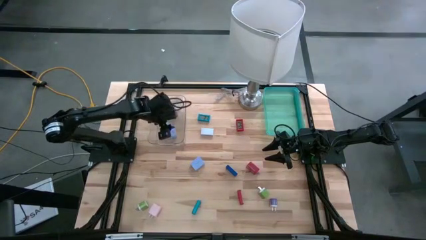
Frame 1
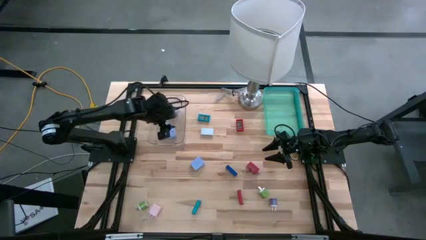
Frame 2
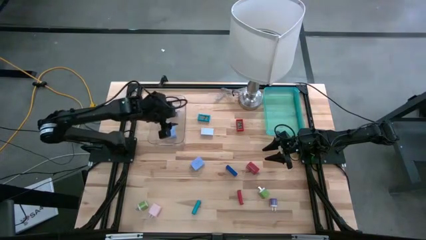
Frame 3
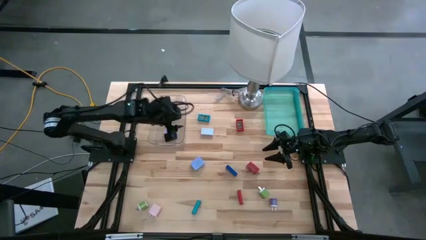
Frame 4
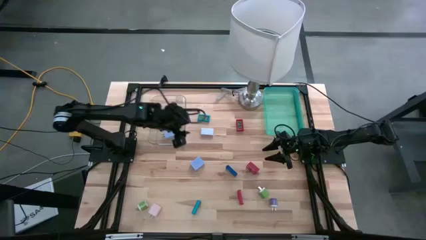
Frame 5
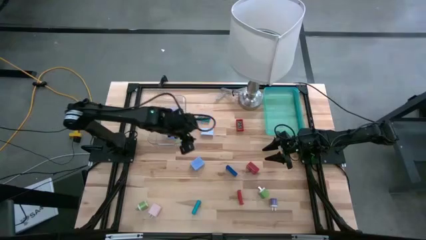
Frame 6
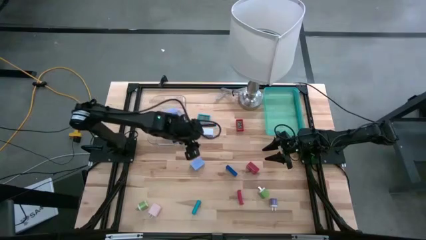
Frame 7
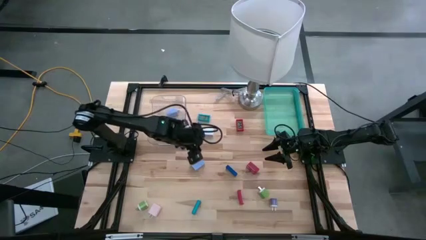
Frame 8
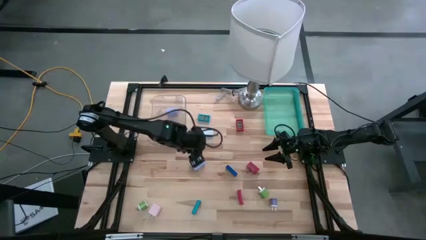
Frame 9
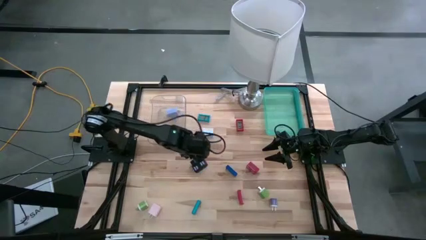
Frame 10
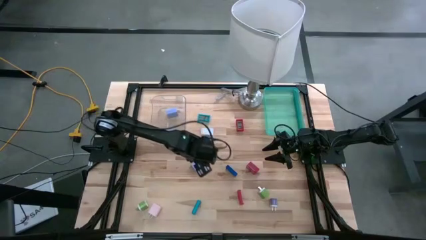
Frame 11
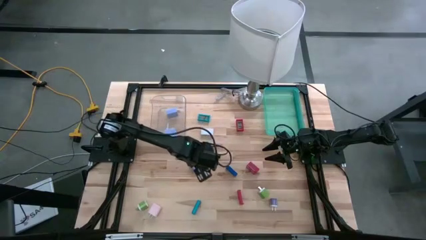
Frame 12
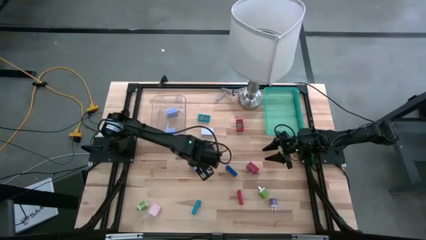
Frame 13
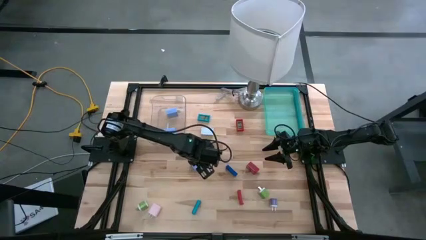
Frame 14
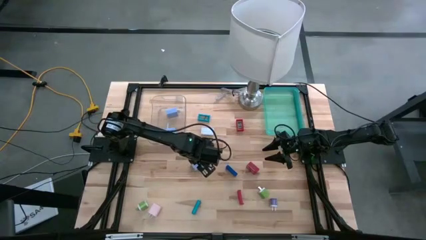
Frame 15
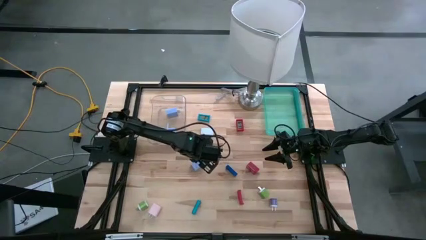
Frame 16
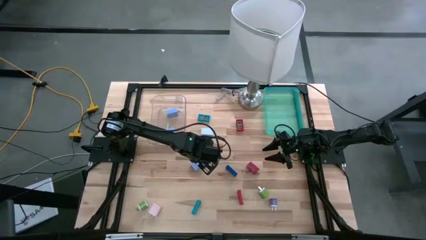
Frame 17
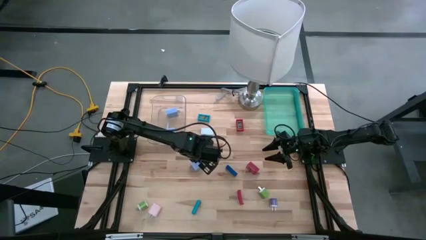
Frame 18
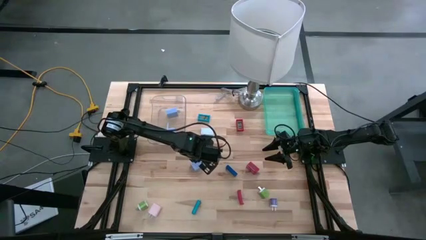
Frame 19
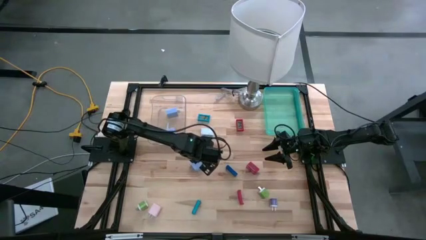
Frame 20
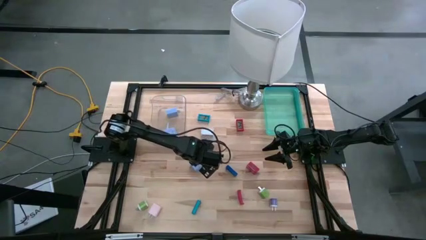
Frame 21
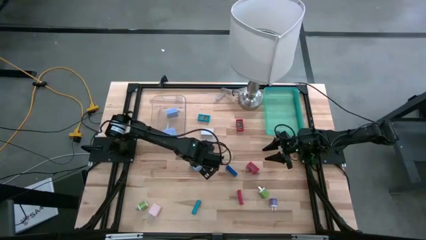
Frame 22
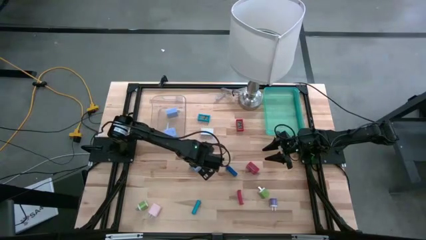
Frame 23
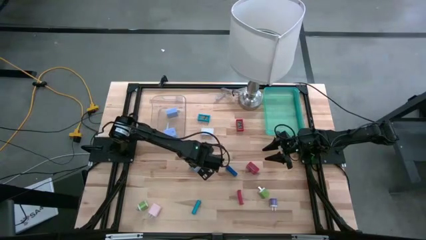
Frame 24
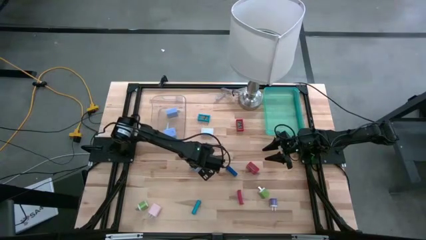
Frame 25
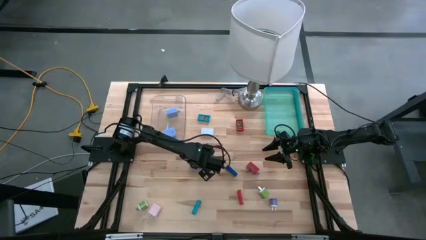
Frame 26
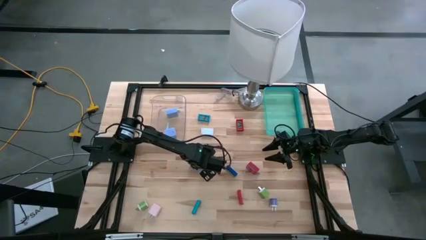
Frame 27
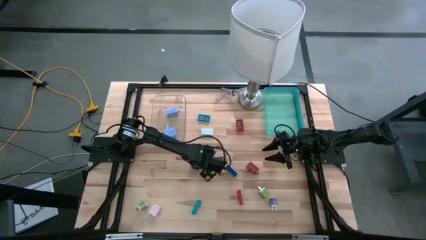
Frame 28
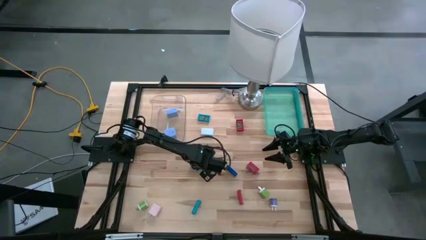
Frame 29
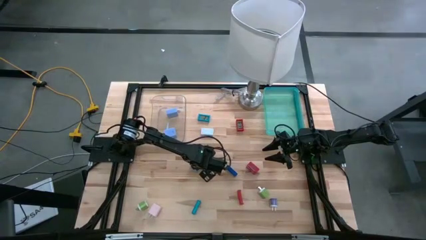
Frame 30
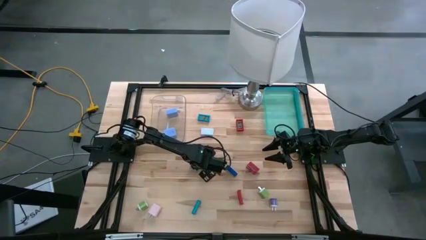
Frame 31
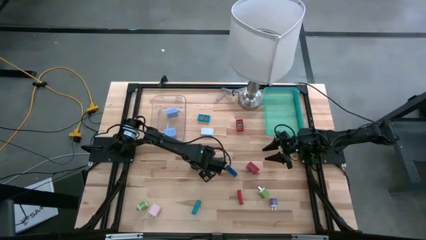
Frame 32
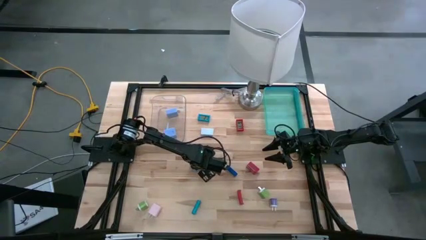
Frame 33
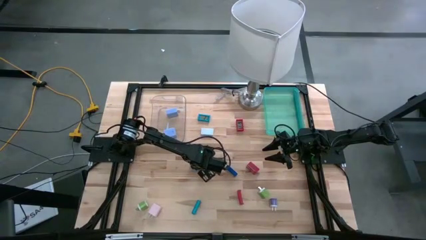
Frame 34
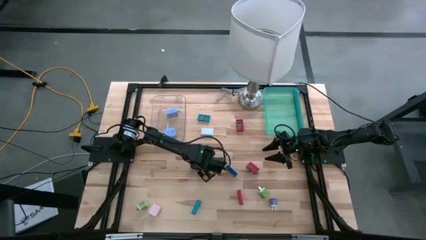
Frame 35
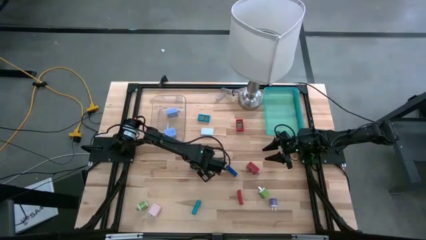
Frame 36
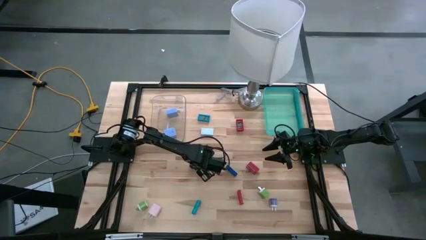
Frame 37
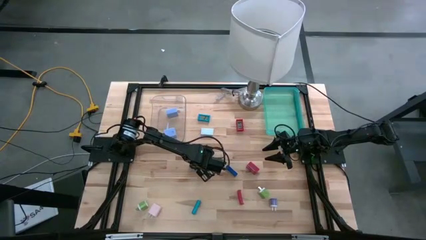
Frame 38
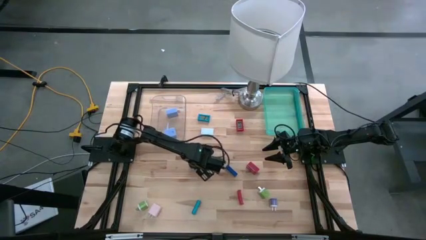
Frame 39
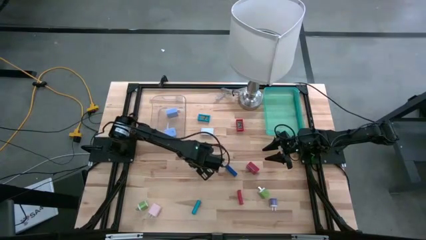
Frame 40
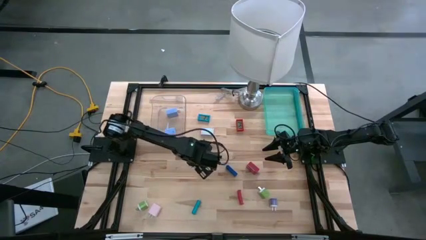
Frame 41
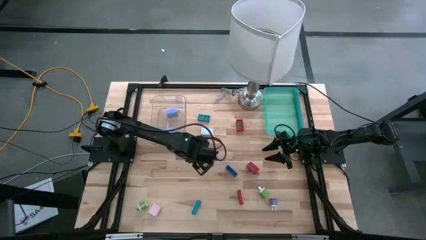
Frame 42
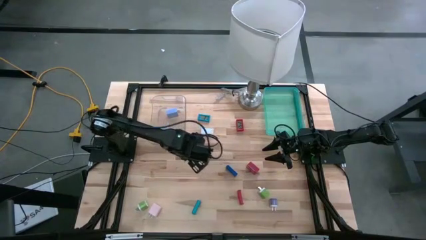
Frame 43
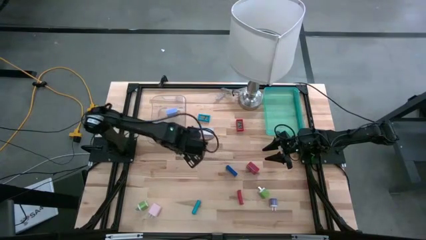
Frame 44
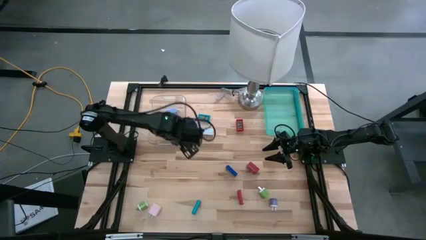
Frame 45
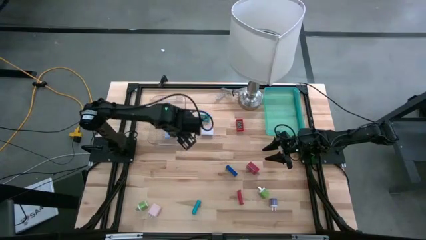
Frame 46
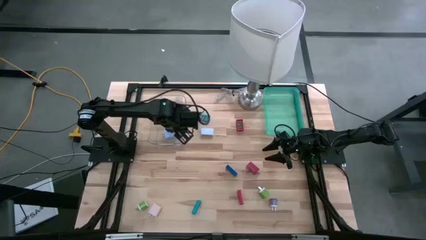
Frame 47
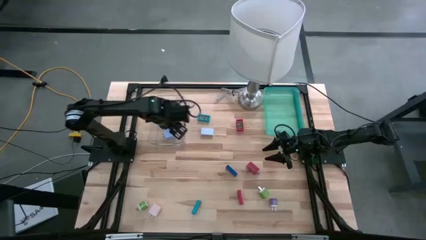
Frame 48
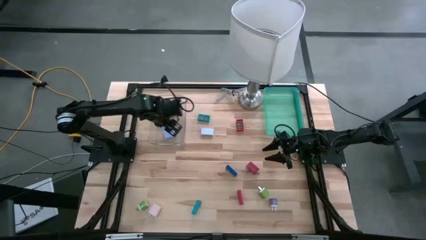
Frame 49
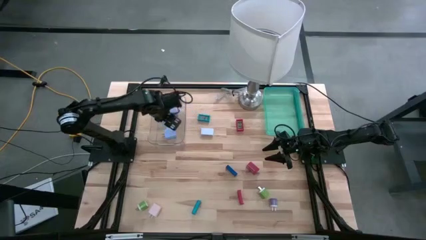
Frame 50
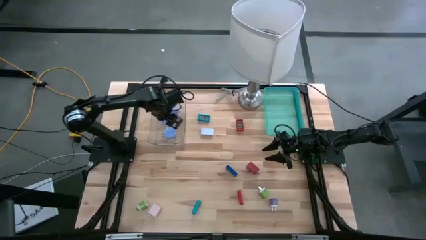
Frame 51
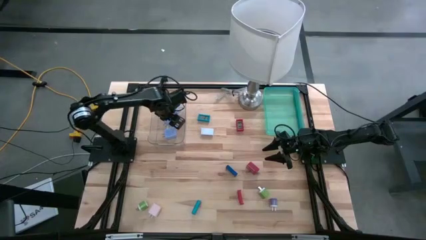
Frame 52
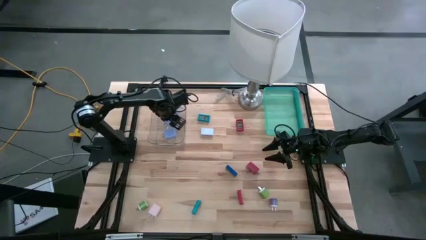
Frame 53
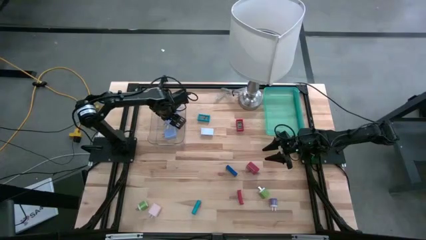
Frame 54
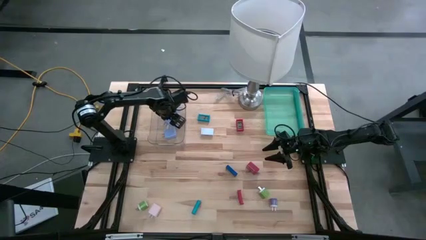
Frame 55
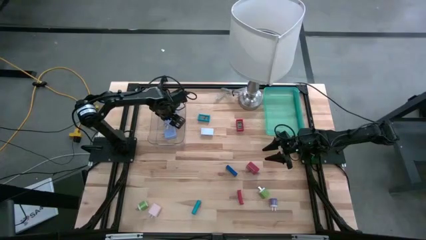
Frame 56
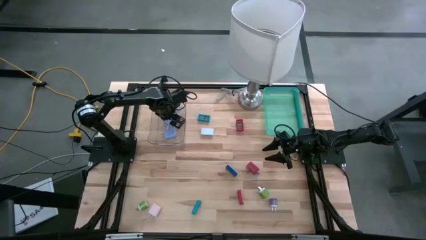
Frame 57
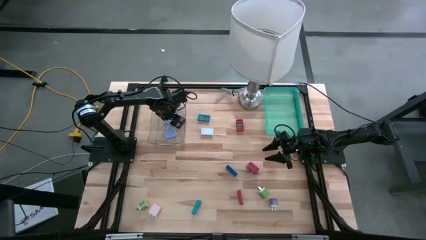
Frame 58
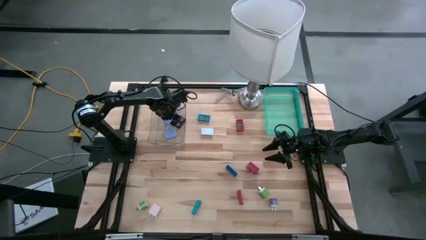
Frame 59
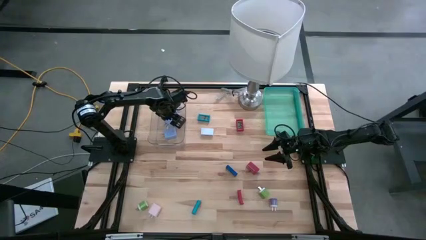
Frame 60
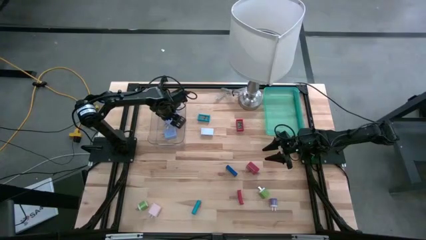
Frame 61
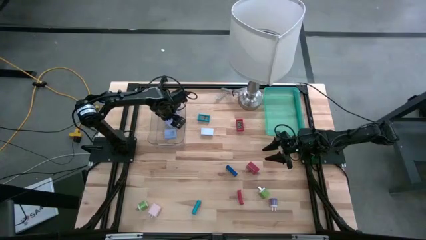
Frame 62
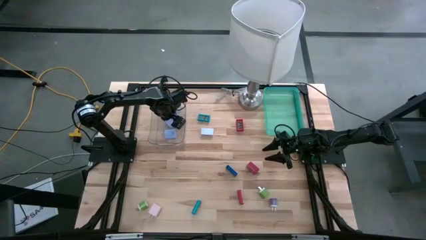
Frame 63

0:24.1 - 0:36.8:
Task: Pick & Place Office items
Put the middle blue charger adapter into the transparent bin

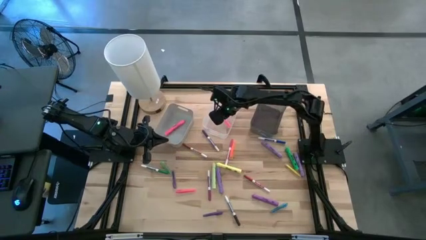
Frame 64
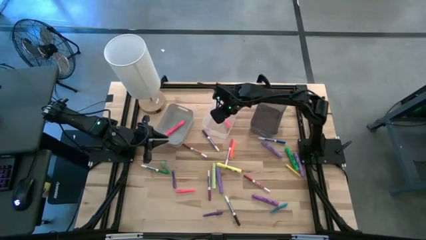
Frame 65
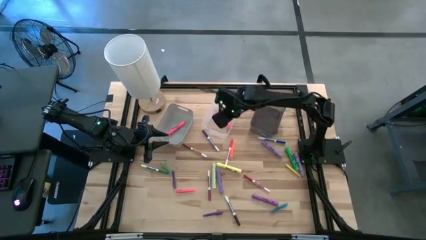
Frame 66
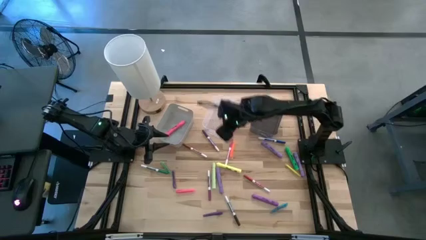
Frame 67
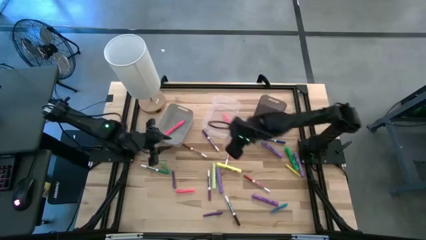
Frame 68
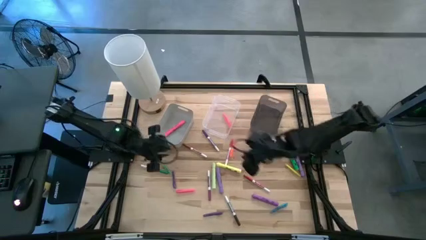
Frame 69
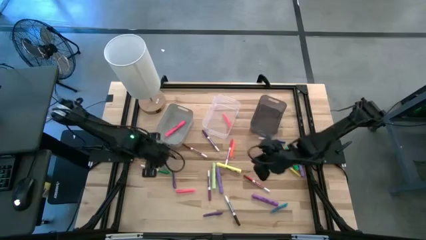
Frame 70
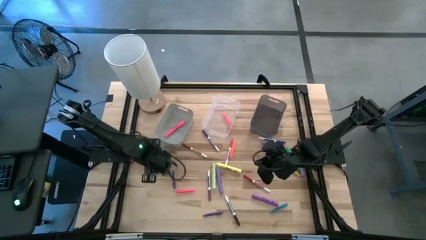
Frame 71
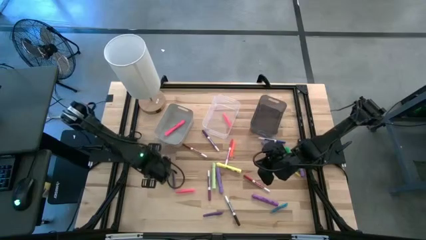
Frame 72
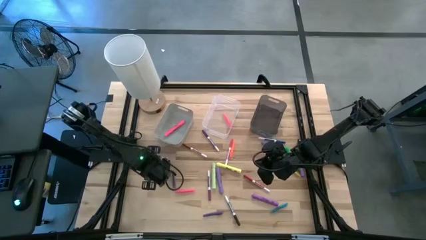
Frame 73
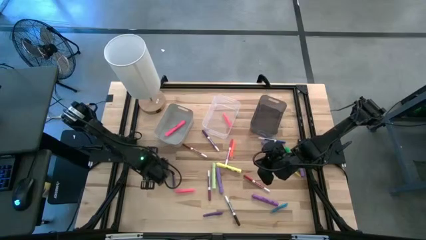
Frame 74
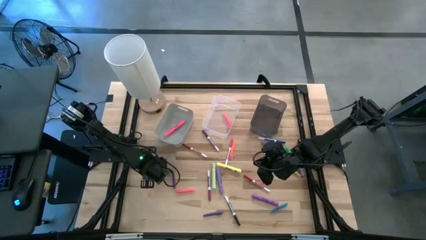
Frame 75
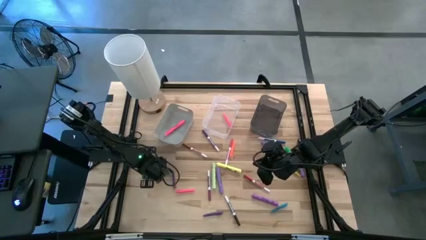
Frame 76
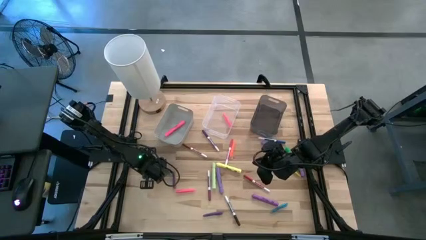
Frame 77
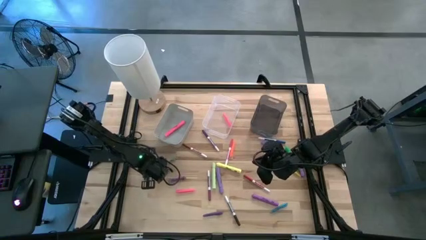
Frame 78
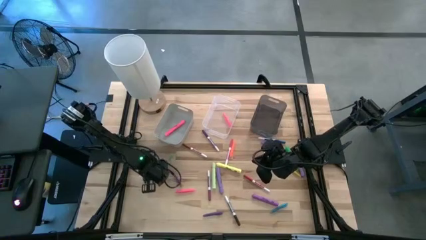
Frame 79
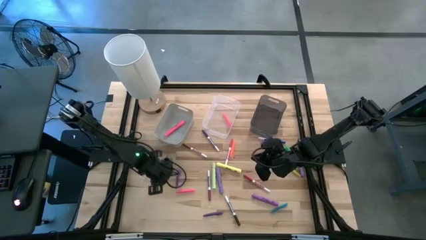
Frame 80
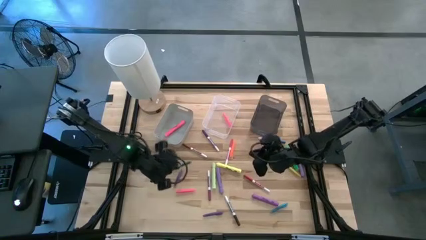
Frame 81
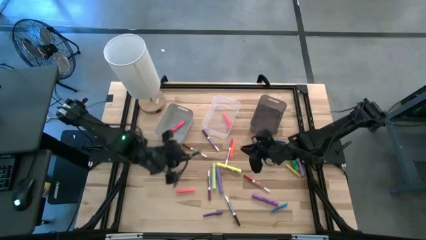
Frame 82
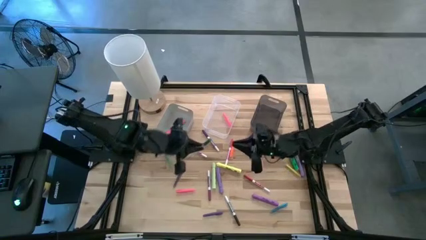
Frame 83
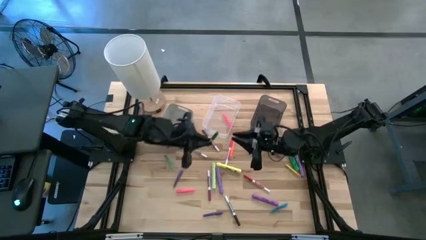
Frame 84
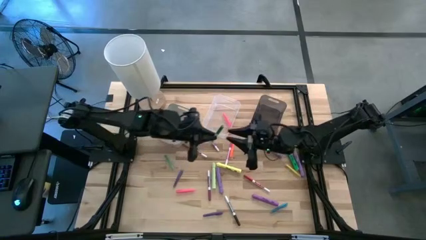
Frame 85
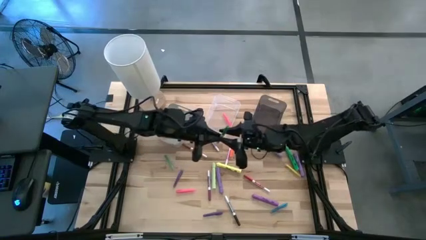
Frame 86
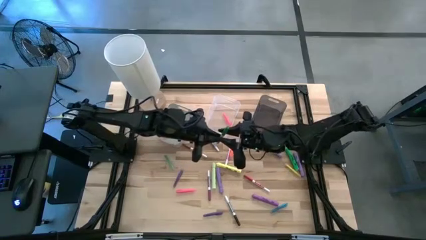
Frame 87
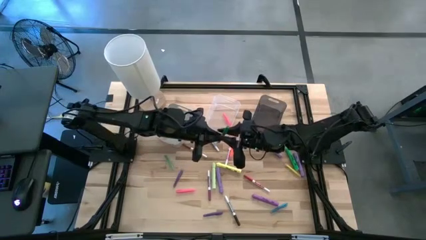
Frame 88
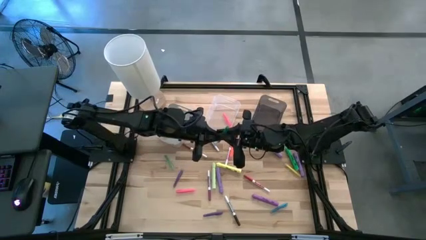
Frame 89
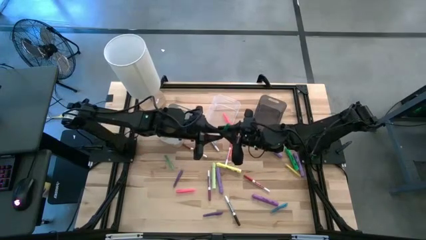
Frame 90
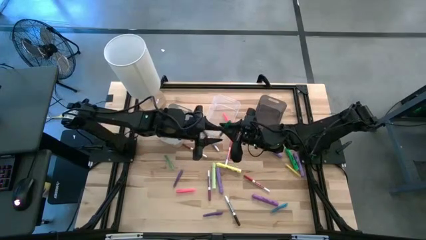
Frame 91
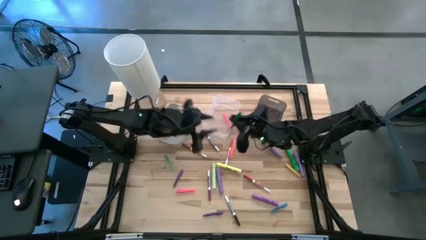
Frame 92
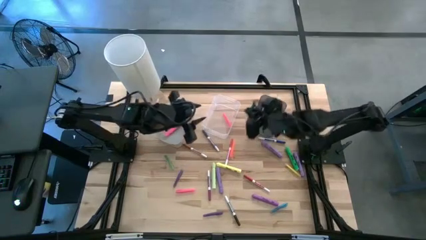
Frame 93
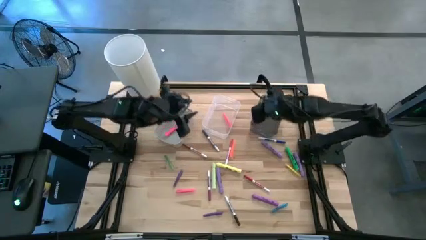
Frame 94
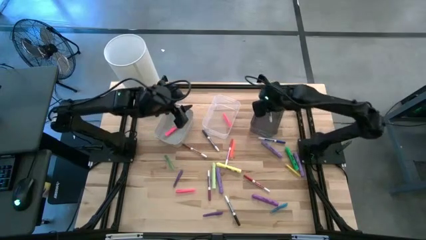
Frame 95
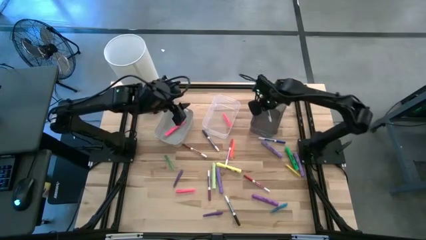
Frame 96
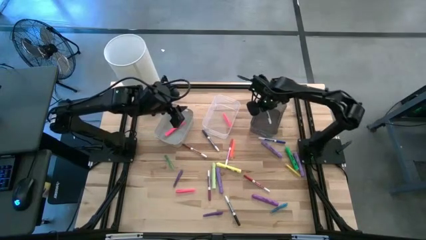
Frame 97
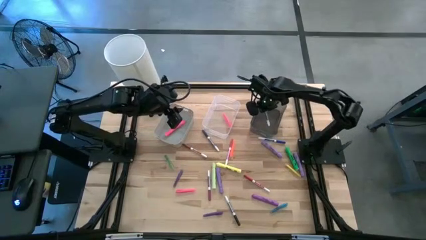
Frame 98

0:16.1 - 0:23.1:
Task: Pick & Place Markers
Put the green marker into the black bin
